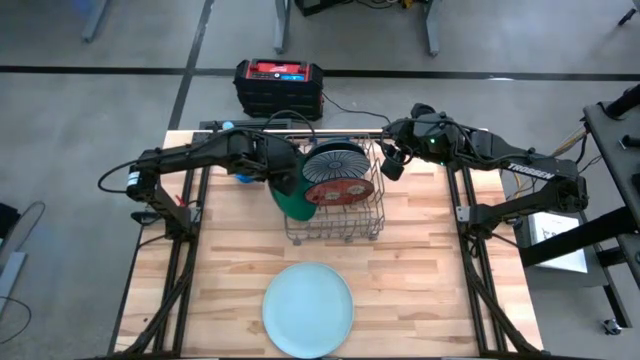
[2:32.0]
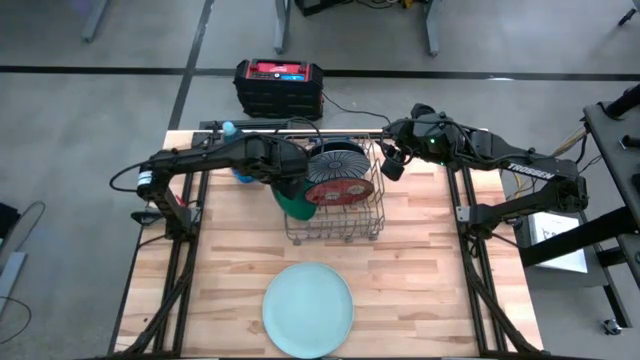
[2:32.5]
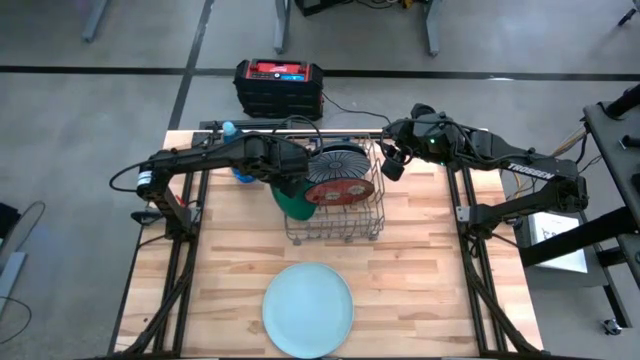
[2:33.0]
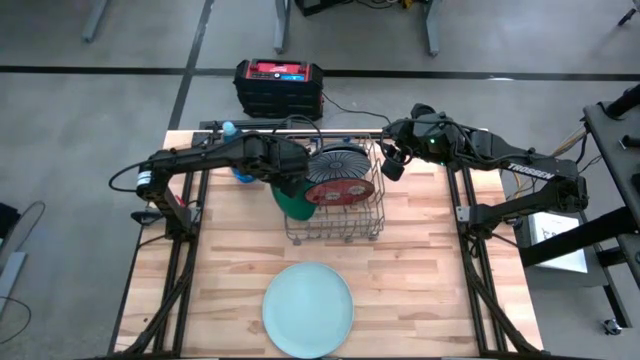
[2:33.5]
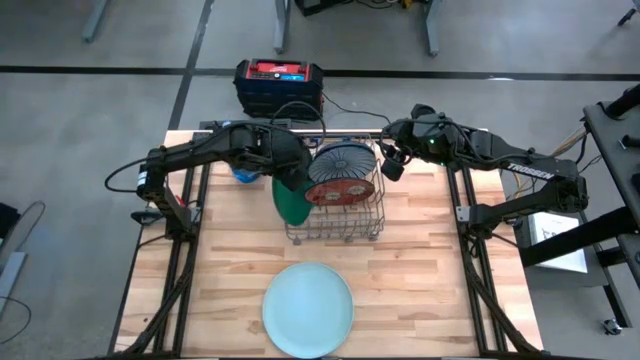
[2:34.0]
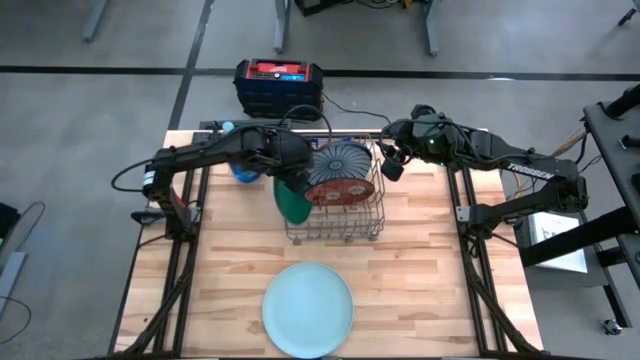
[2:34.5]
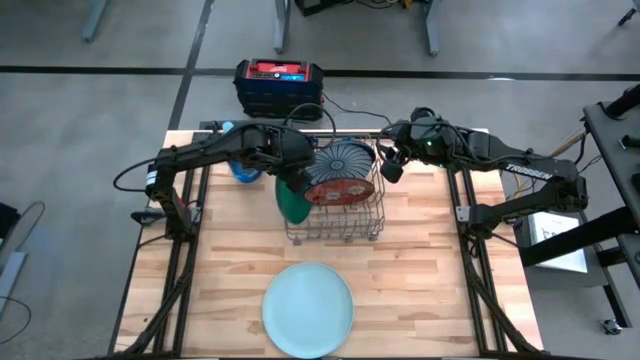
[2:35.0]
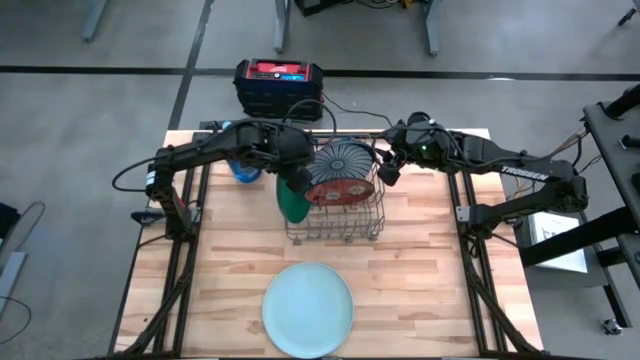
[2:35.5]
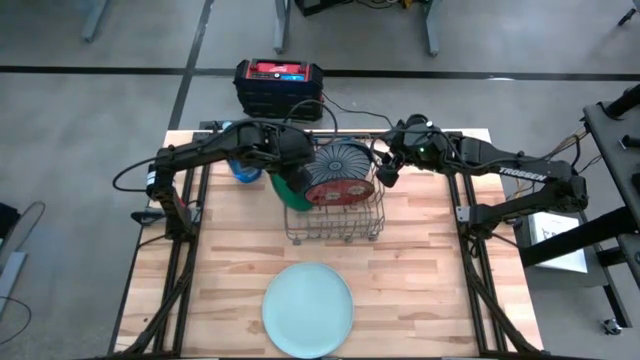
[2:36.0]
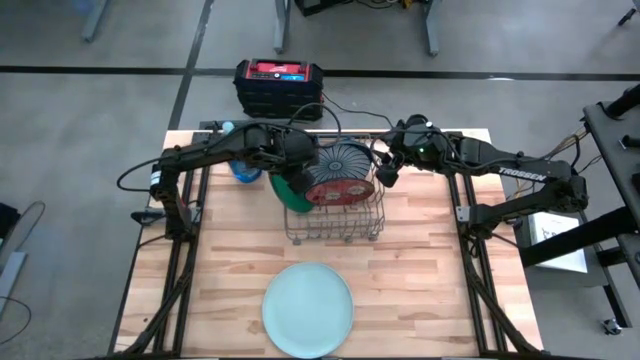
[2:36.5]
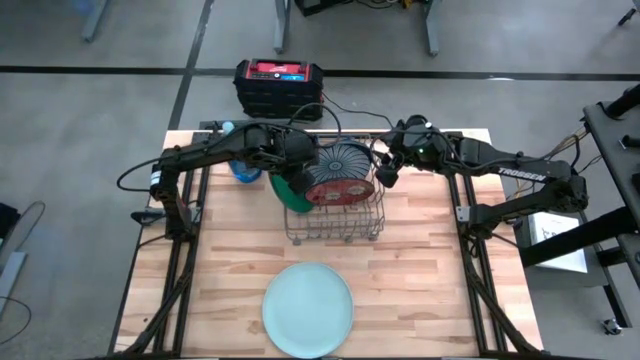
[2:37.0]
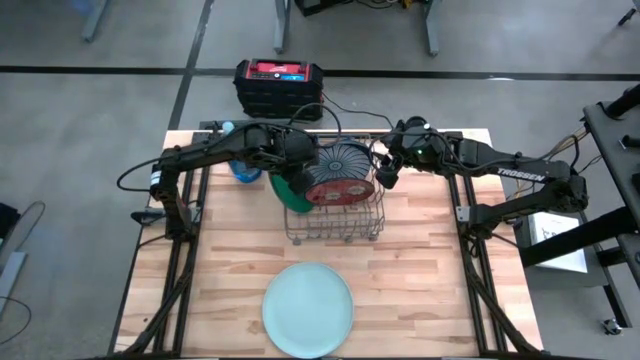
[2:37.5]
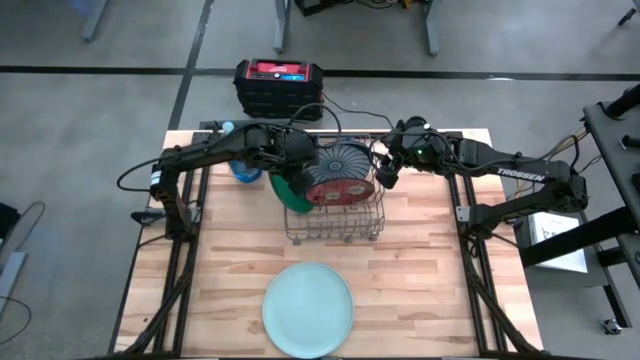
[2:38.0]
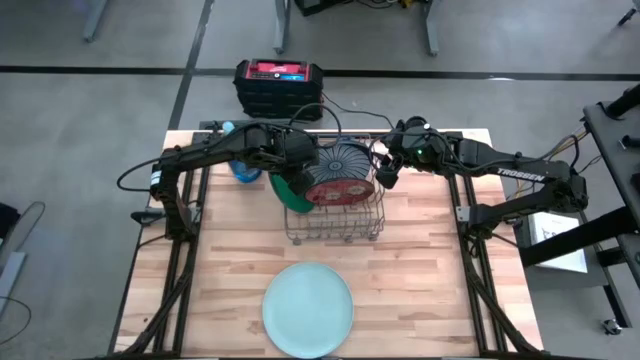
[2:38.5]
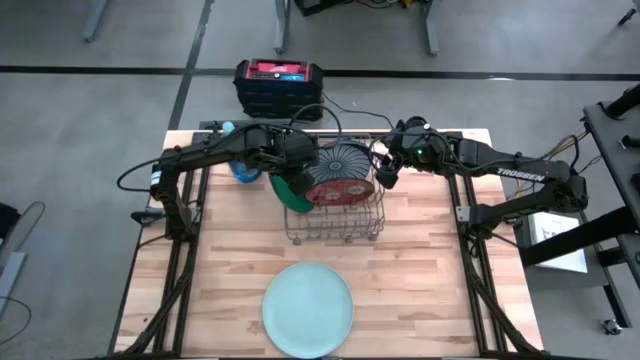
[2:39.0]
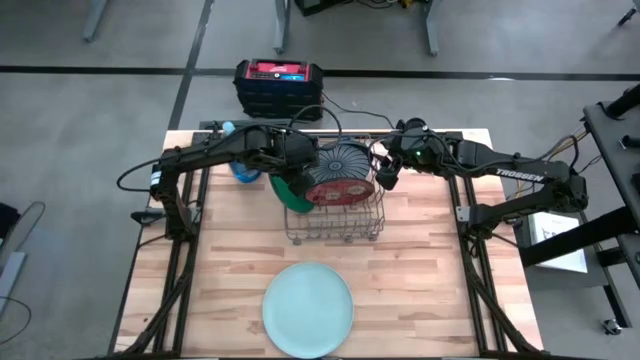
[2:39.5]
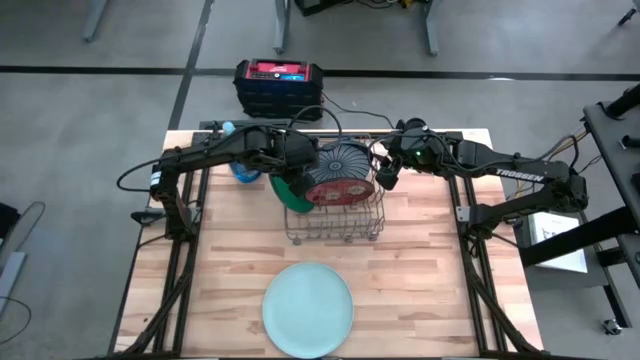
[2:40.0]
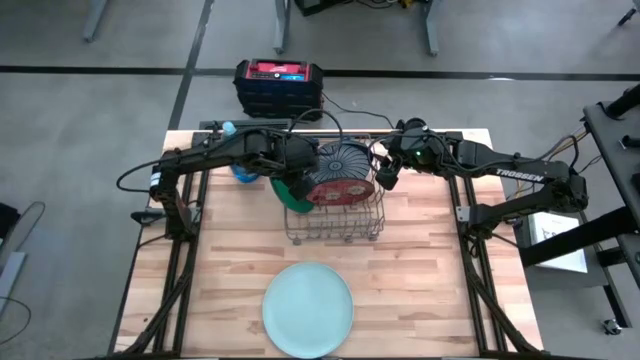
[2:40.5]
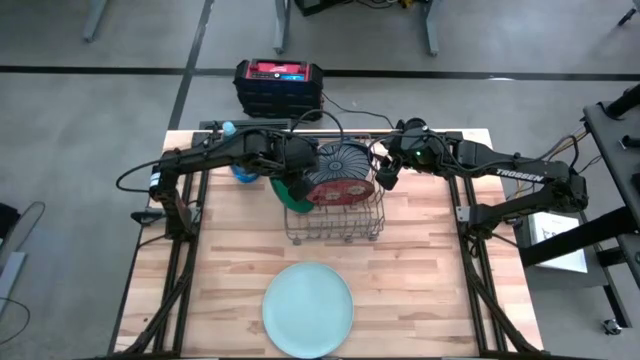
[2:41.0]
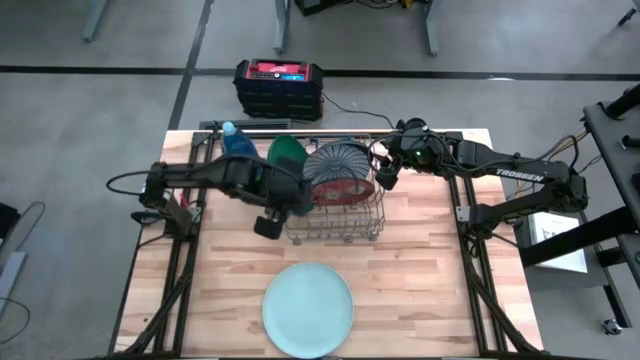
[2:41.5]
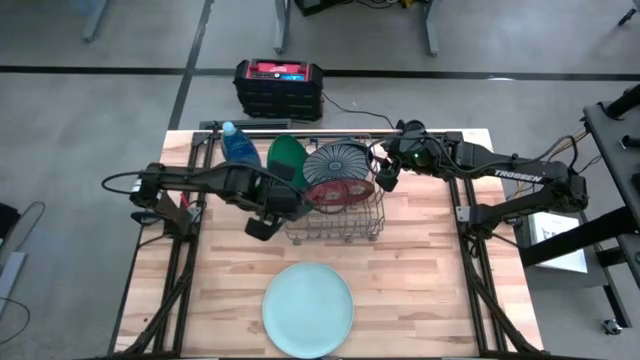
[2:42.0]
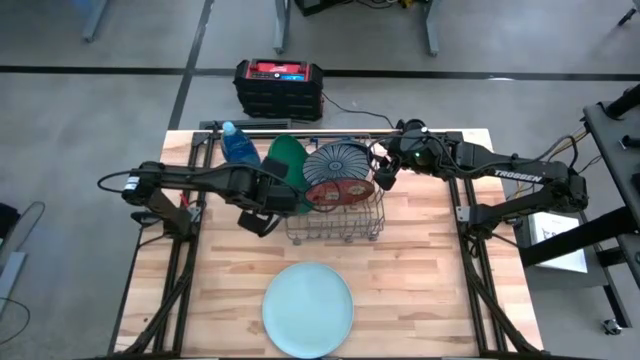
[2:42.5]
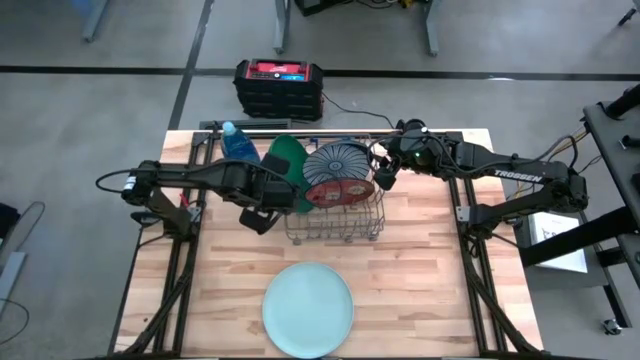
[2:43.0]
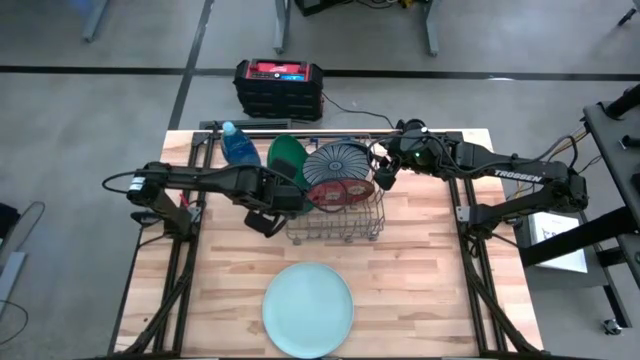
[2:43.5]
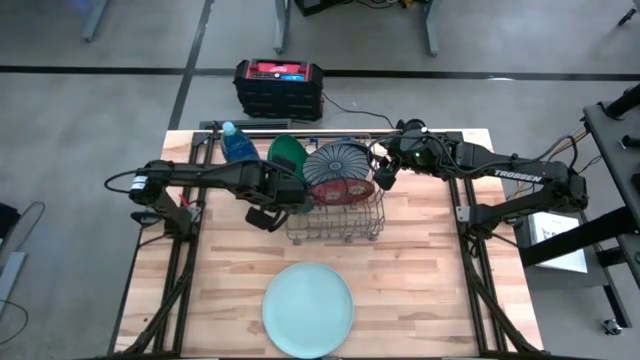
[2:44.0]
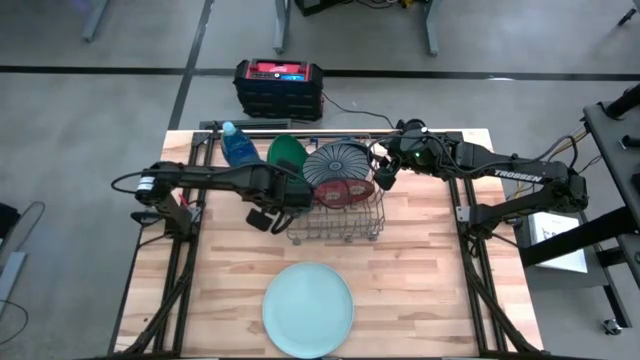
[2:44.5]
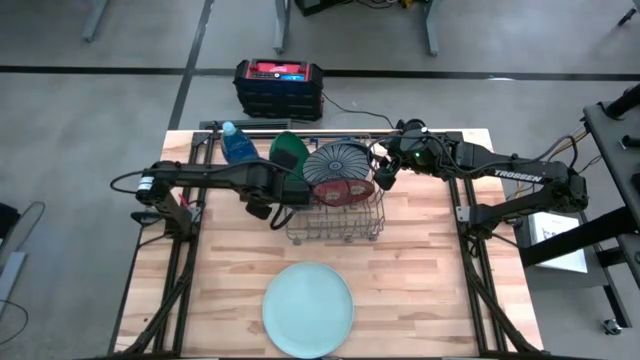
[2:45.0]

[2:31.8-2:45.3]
Task: Sort dishes
Put the green plate into the gray dishwasher rack

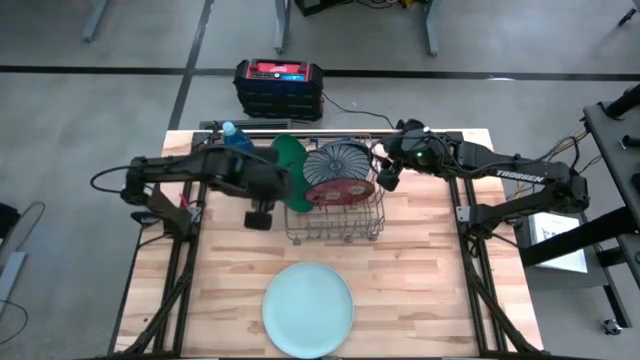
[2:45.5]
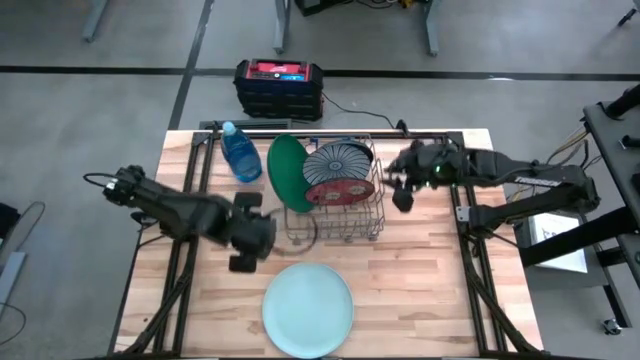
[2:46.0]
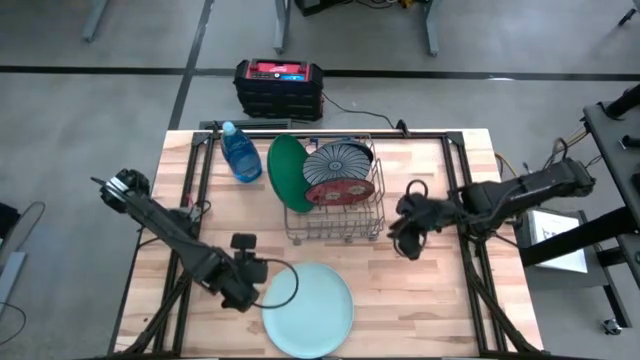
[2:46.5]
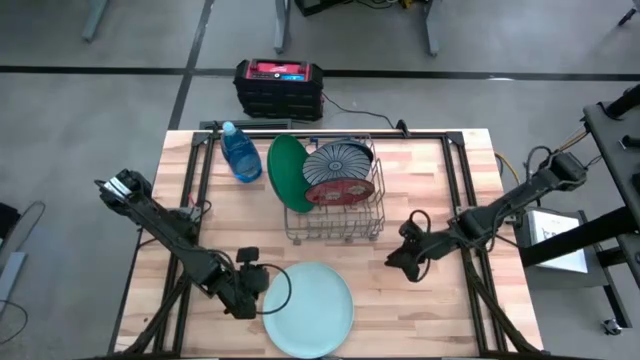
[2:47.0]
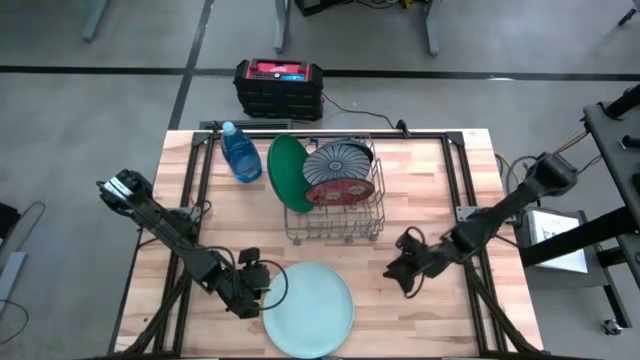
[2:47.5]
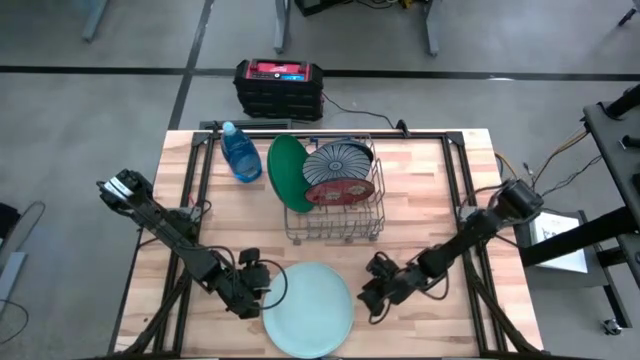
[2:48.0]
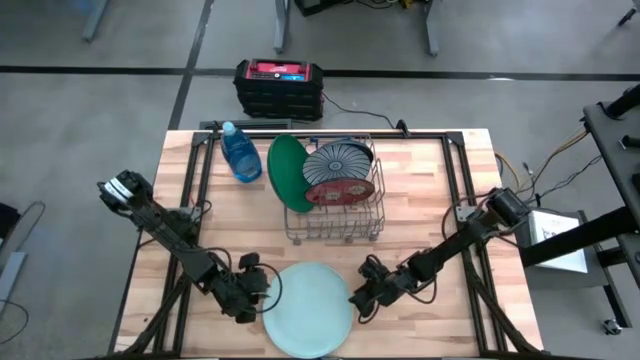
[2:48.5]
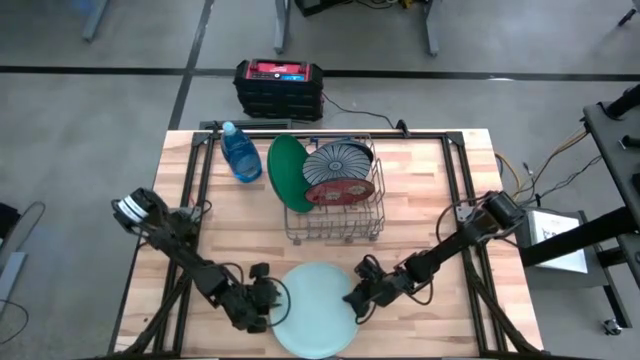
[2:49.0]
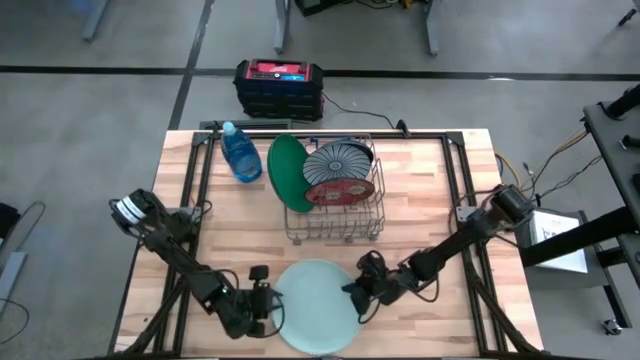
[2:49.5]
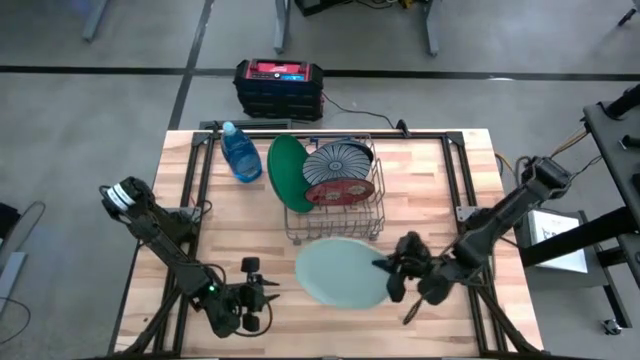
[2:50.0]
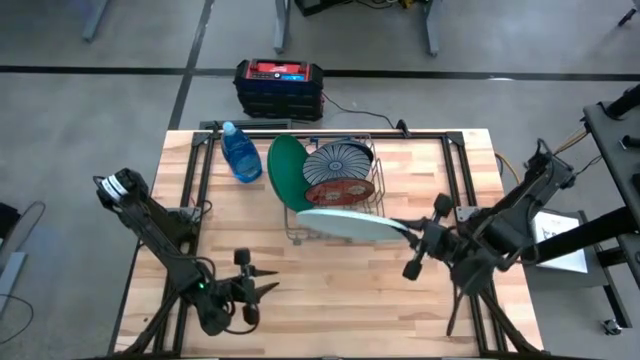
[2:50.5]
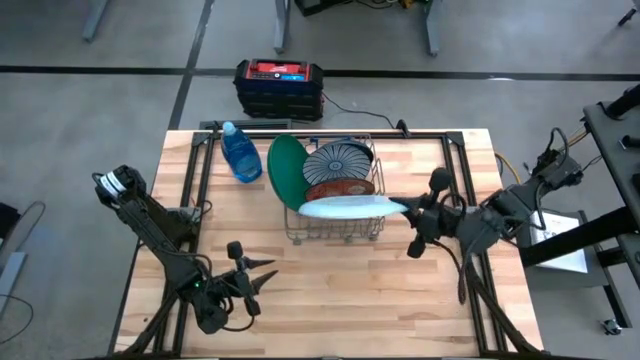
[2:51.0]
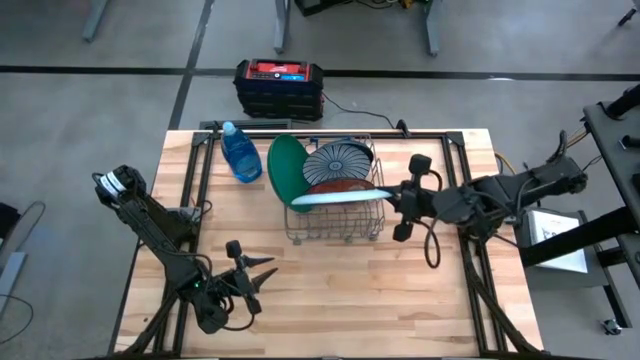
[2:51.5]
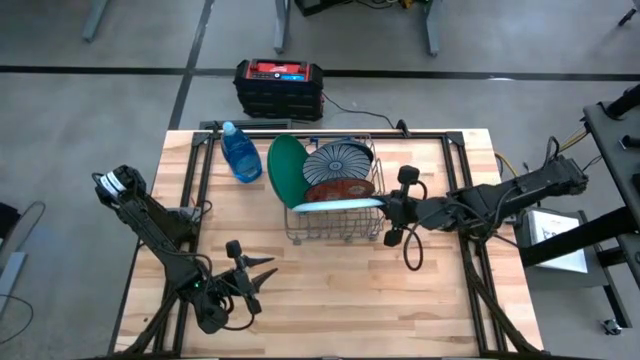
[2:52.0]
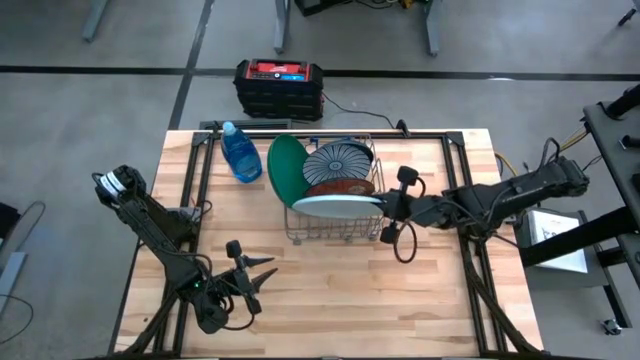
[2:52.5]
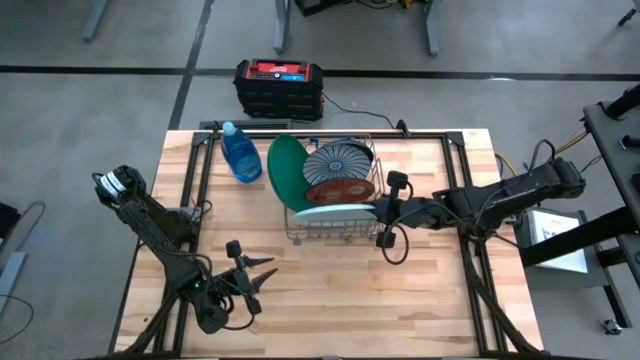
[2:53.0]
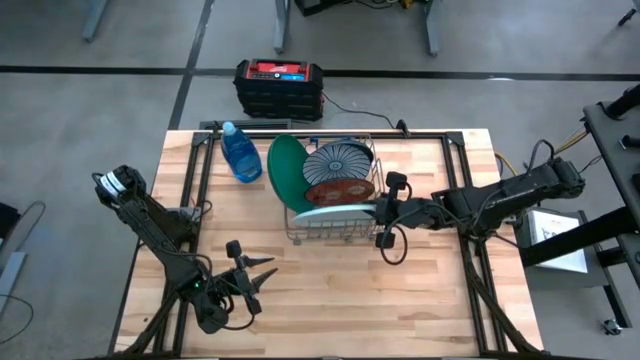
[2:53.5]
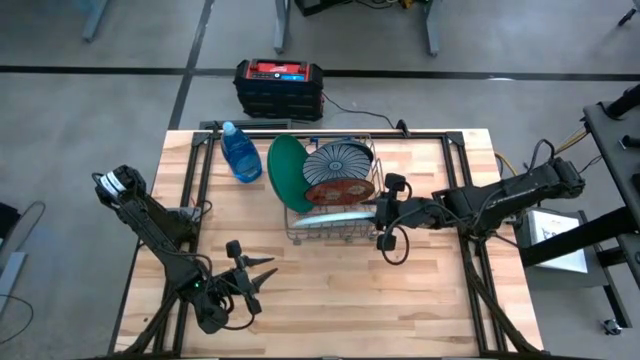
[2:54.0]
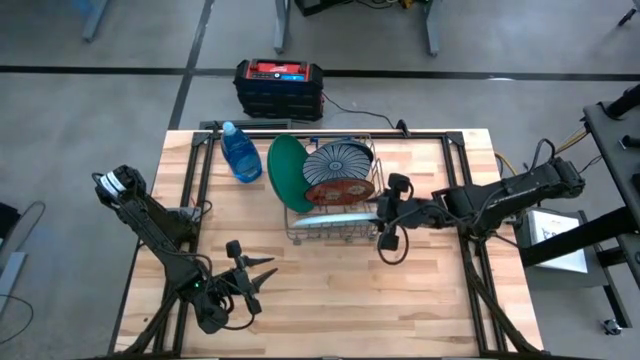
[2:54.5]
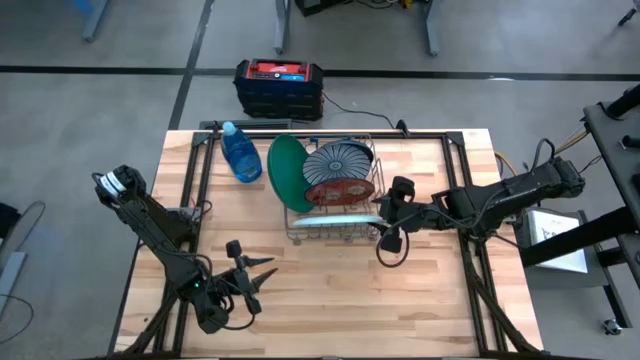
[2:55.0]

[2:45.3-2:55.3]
Put the white plate into the gray dishwasher rack
